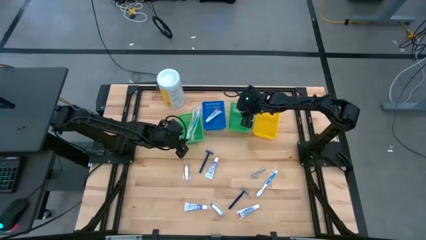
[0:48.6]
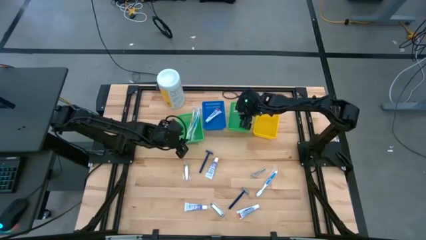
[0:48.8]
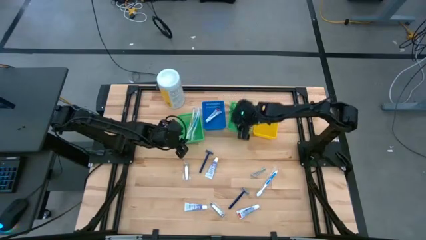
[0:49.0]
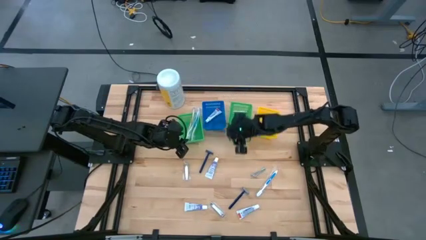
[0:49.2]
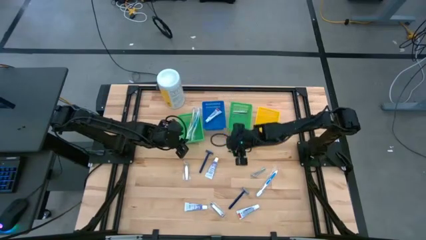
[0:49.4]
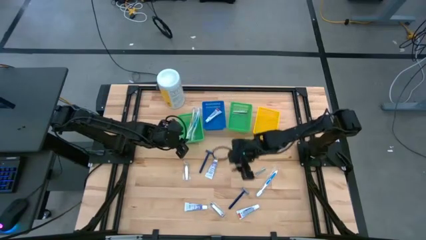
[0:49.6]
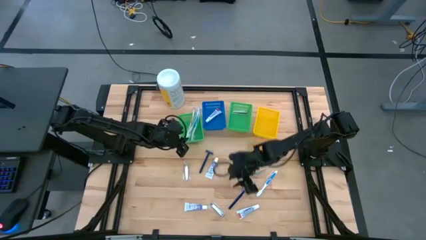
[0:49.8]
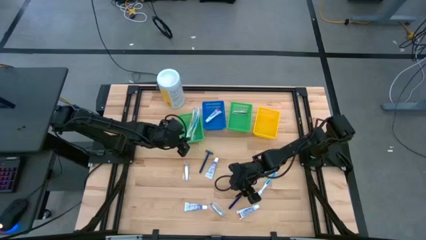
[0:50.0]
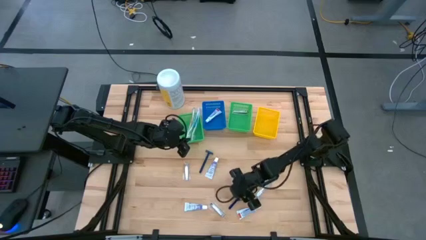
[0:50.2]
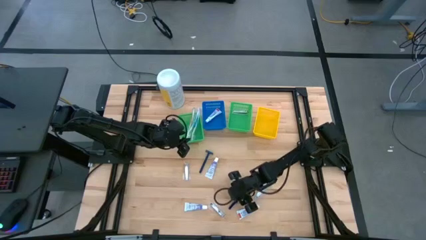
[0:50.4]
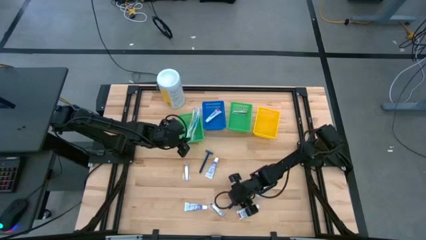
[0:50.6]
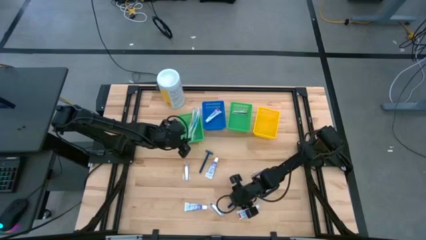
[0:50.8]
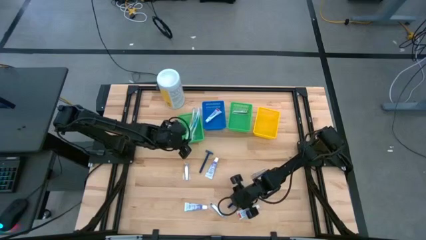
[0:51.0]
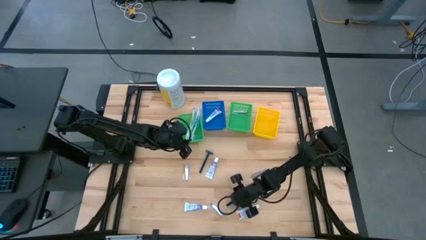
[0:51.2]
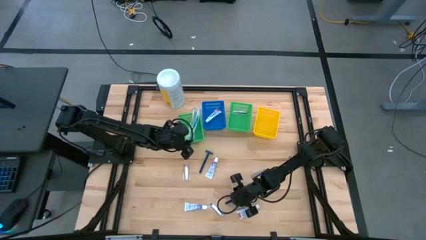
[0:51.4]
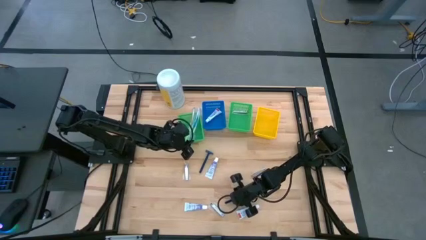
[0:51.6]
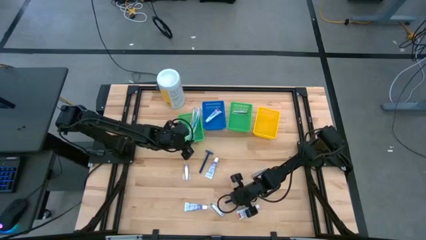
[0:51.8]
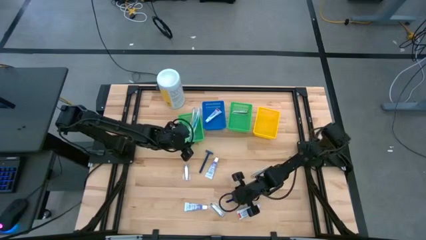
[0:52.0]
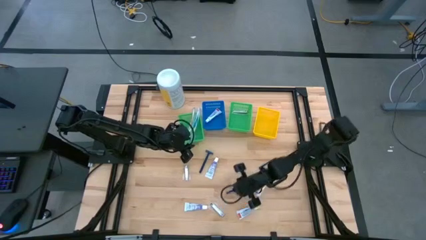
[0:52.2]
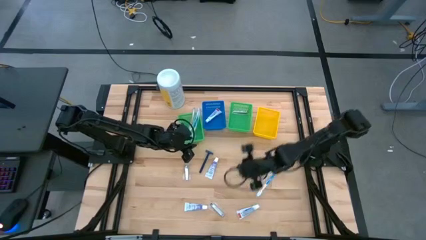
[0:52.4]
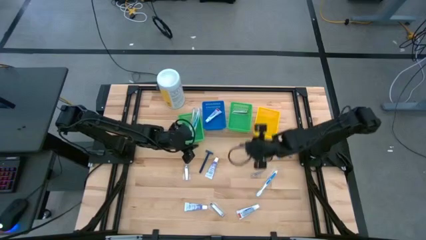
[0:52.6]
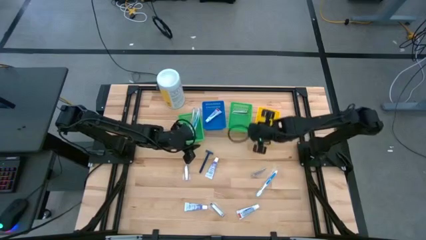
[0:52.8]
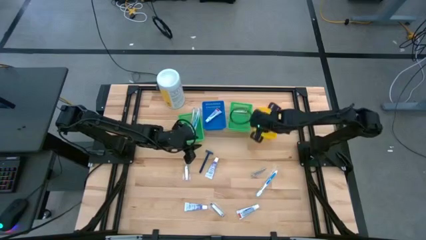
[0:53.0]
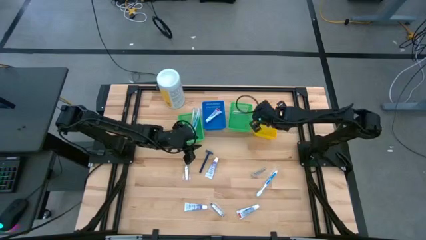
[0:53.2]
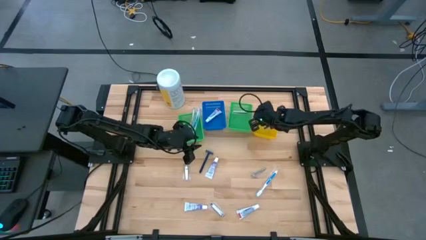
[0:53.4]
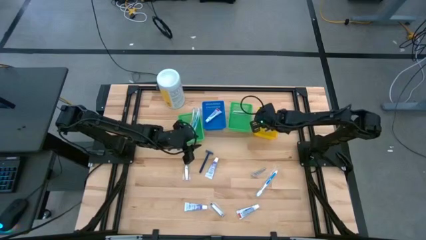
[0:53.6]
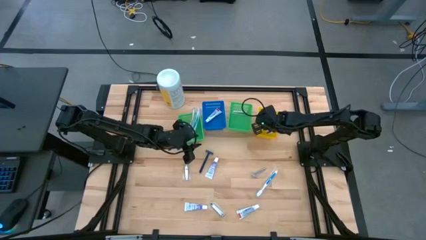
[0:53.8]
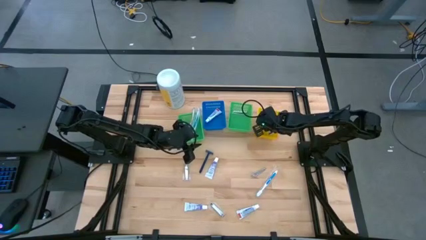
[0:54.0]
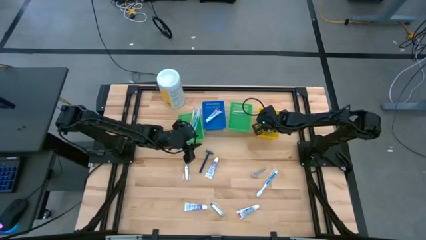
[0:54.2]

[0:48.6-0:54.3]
Task: Pick & Place Travel size toiletries
Put the blue razor into the yellow basket

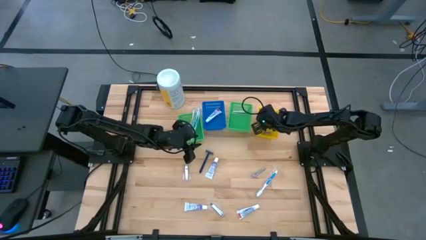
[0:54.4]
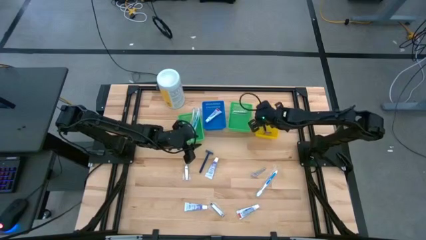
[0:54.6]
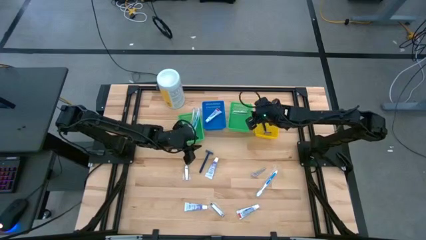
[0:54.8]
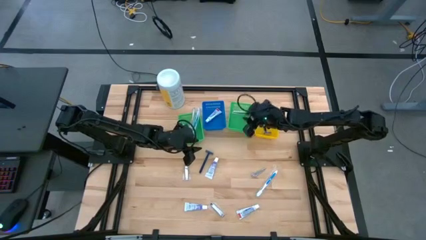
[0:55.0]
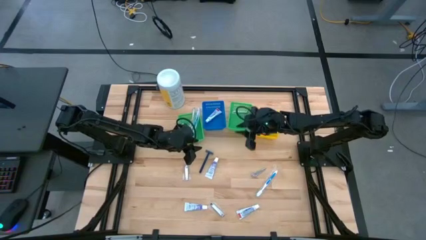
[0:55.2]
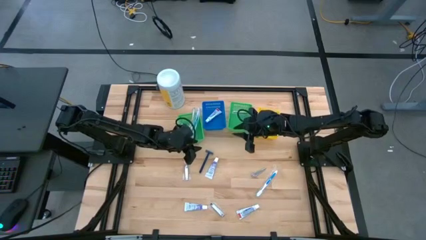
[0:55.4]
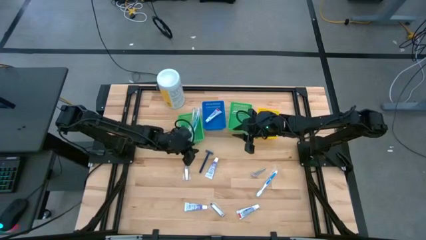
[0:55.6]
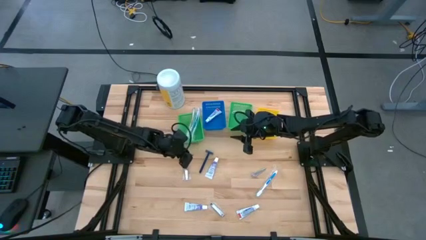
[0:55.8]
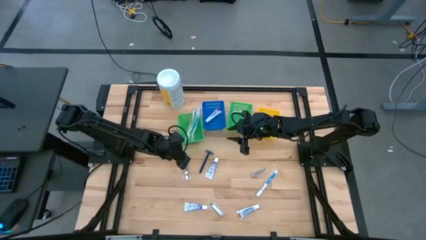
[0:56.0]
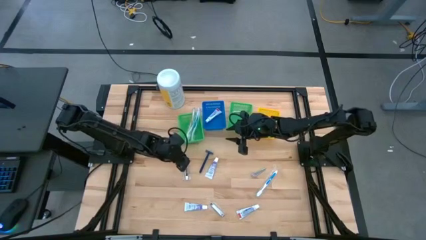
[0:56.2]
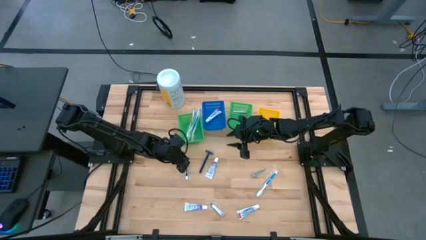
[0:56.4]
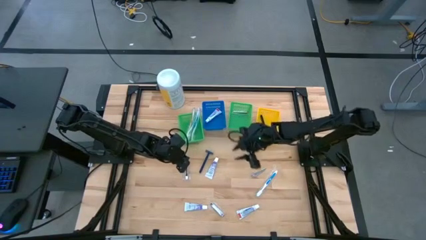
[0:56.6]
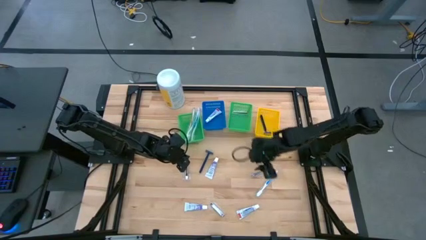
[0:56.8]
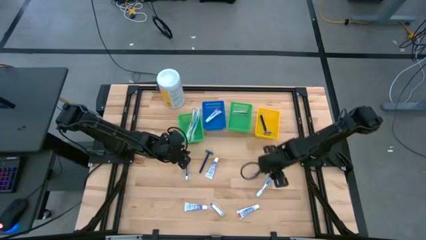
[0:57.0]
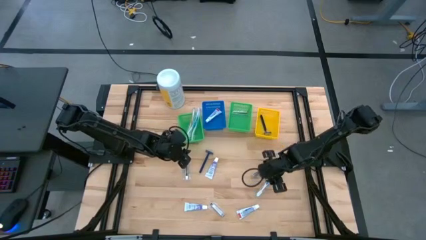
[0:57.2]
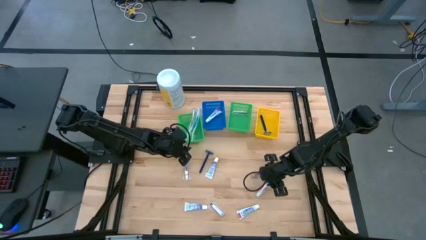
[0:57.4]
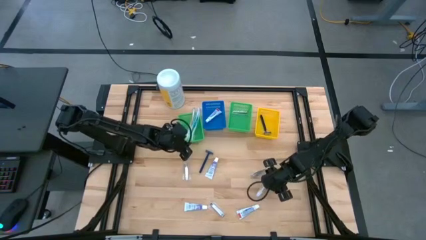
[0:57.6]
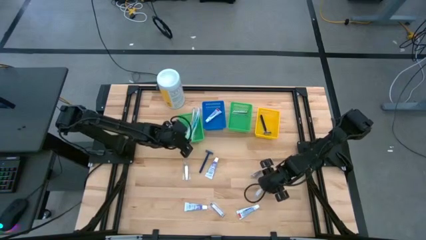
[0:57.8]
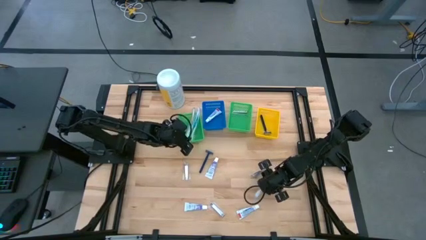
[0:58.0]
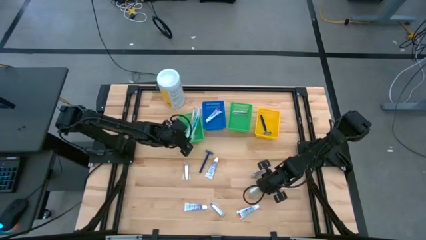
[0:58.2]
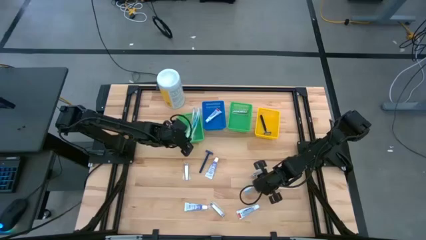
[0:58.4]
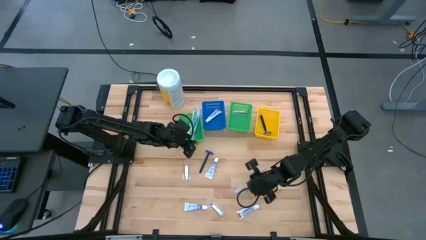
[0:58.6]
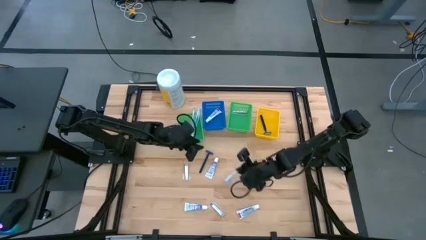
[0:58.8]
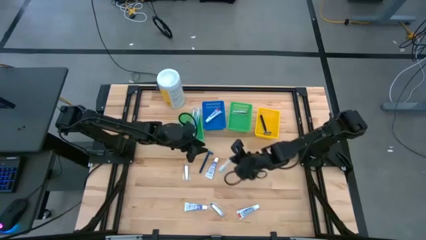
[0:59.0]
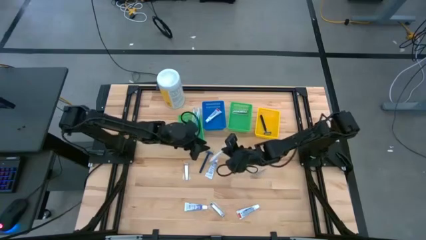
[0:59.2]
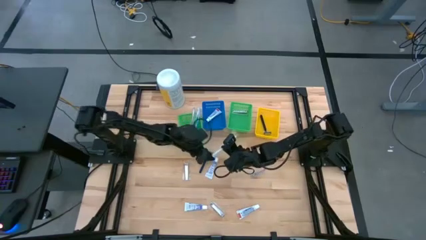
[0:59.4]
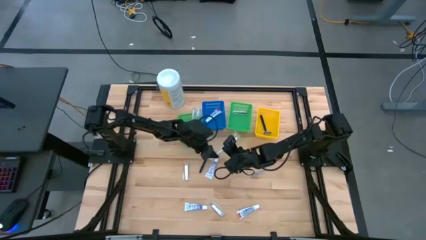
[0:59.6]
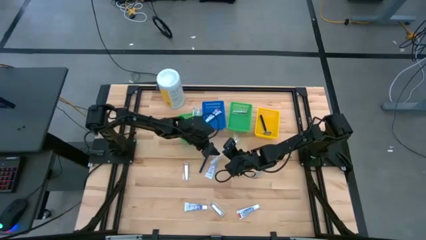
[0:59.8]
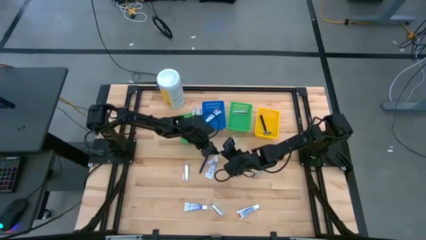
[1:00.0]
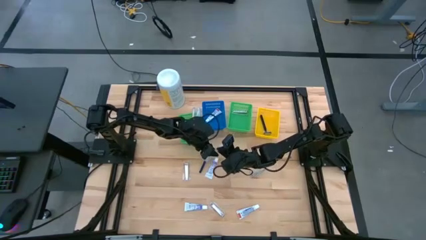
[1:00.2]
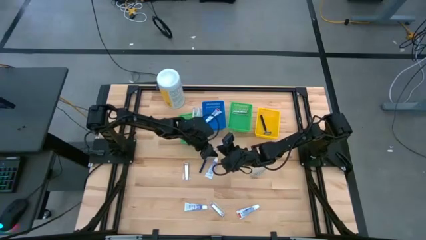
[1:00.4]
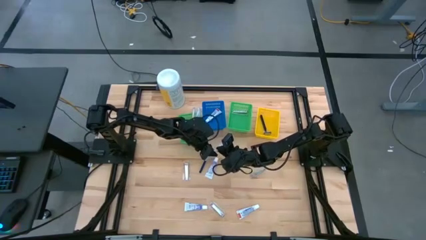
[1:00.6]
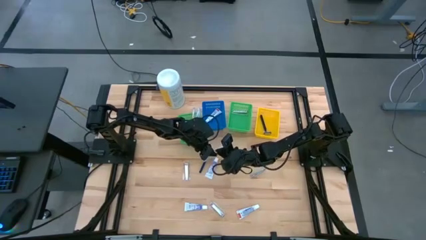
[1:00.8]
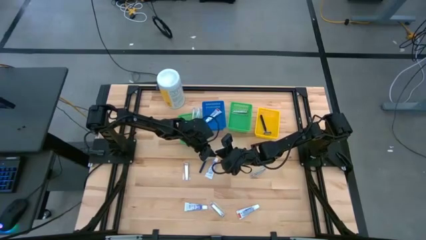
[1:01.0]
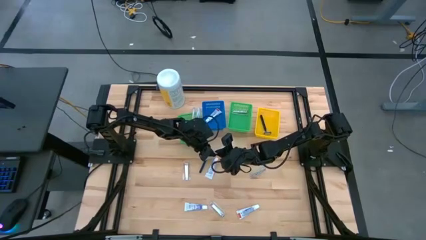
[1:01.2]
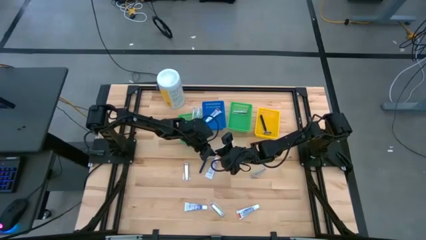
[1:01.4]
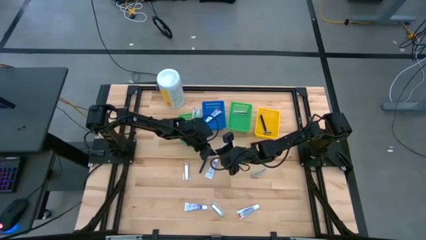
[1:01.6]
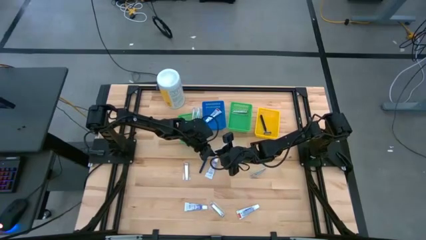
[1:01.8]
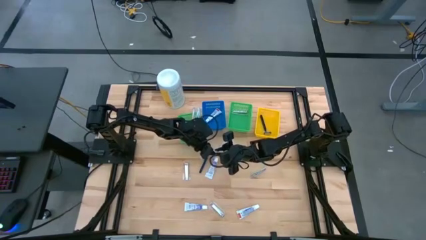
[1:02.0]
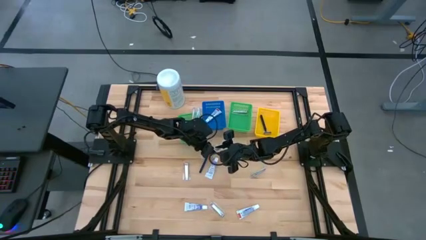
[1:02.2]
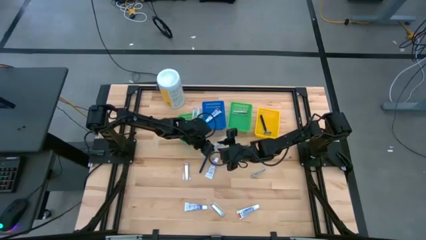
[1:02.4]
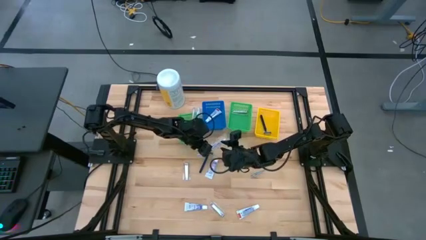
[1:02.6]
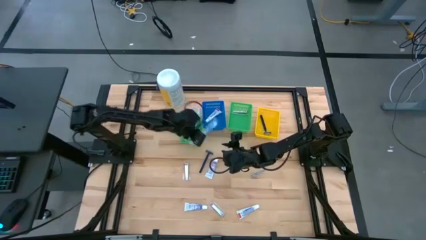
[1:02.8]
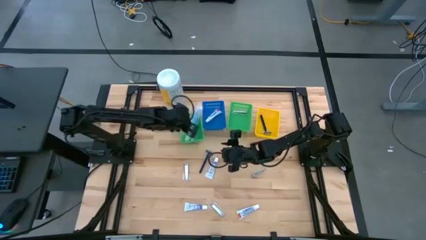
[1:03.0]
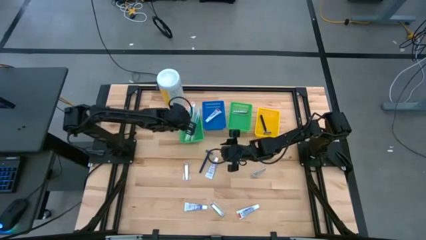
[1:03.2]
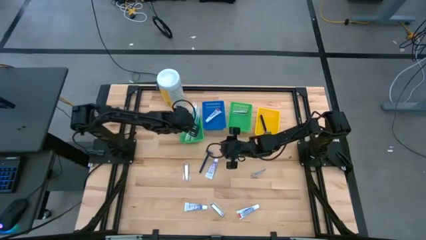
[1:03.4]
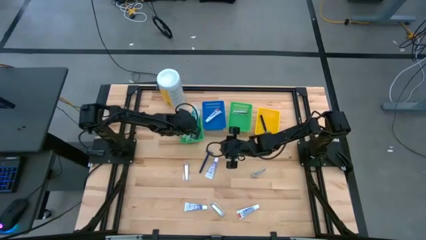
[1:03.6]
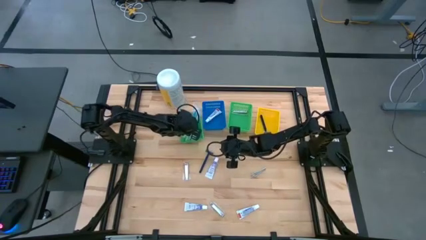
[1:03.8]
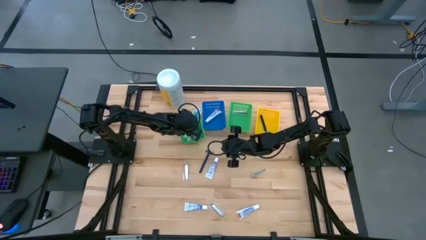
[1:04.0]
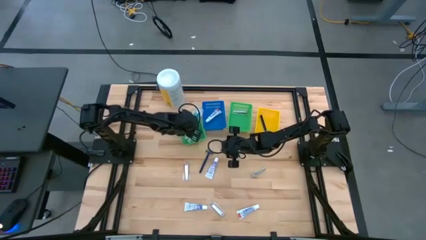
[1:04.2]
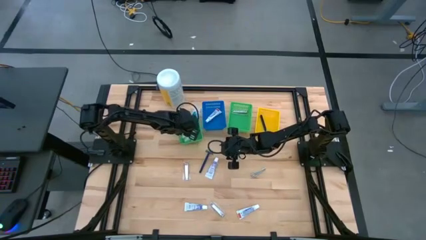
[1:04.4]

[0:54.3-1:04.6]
Put the blue toothbrush into the left green basket
